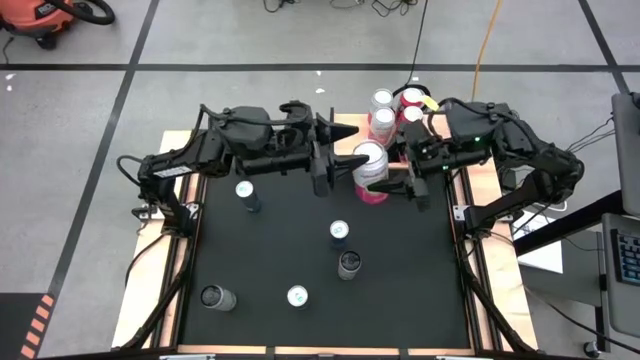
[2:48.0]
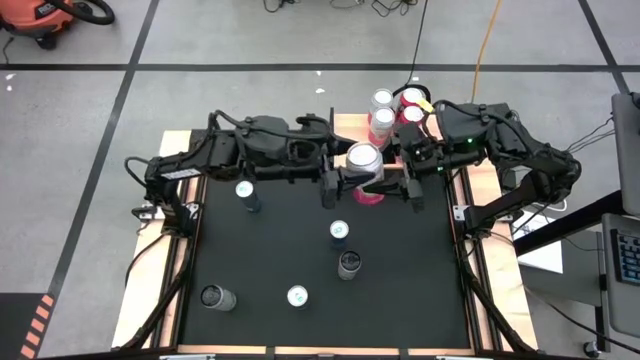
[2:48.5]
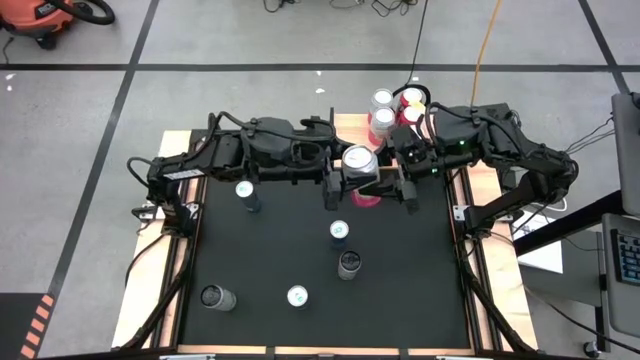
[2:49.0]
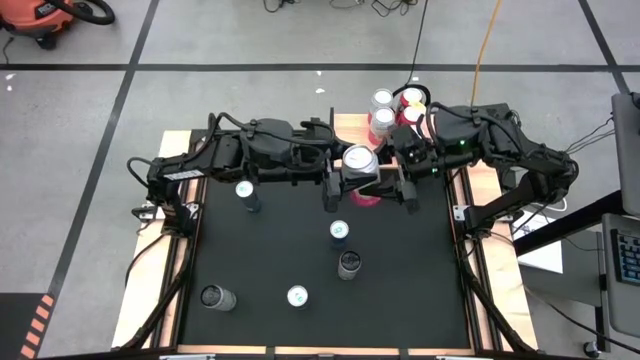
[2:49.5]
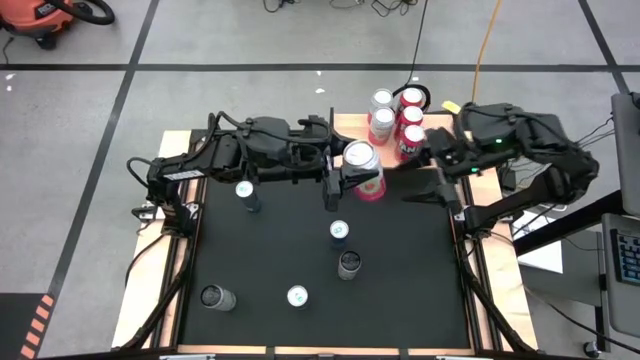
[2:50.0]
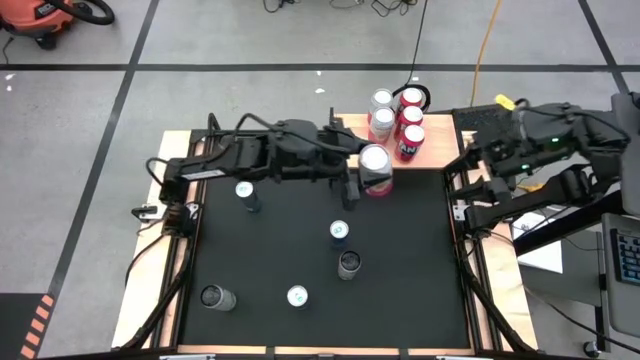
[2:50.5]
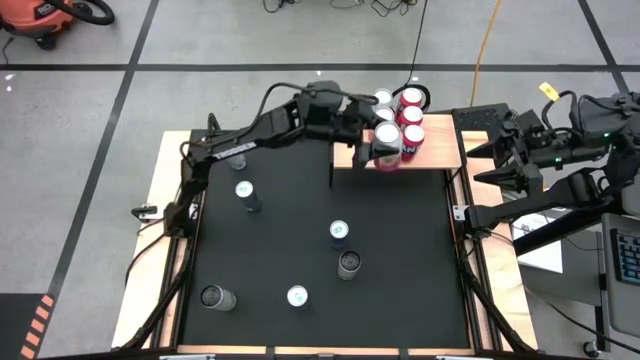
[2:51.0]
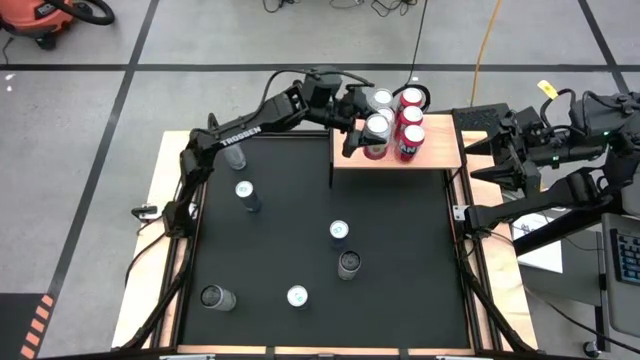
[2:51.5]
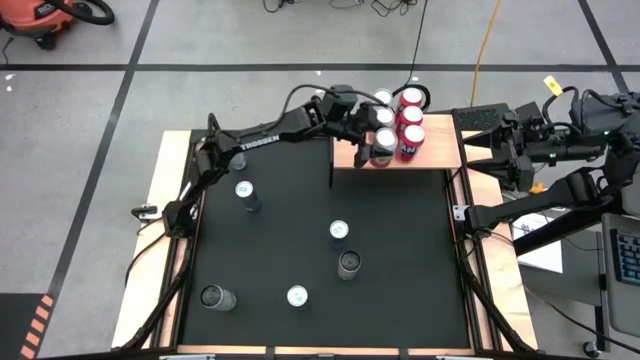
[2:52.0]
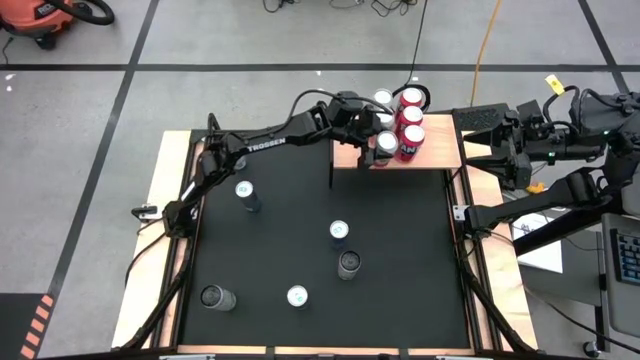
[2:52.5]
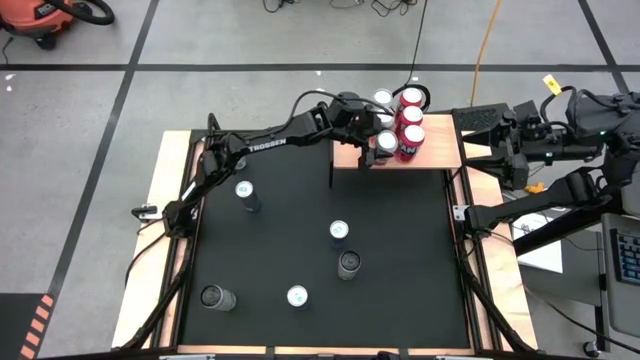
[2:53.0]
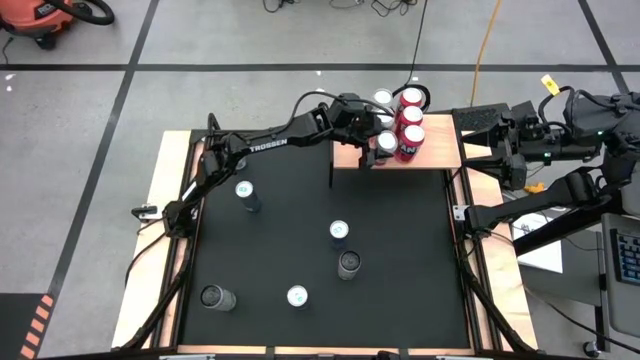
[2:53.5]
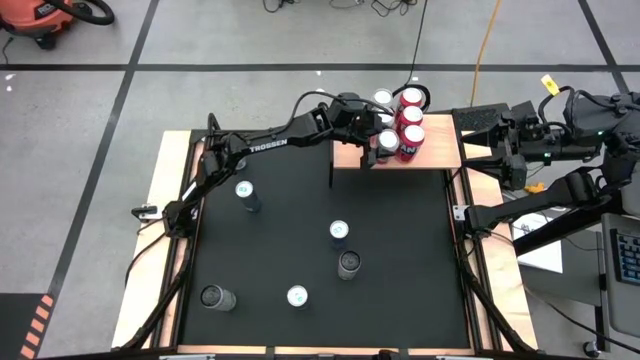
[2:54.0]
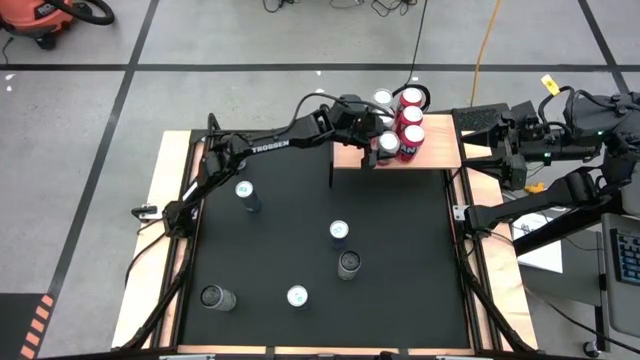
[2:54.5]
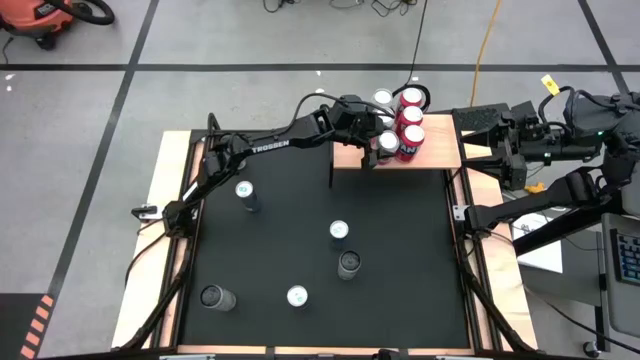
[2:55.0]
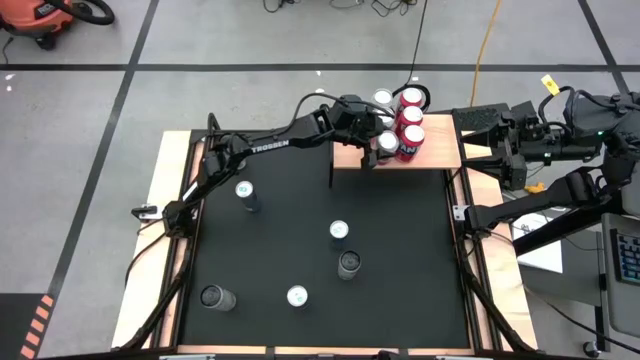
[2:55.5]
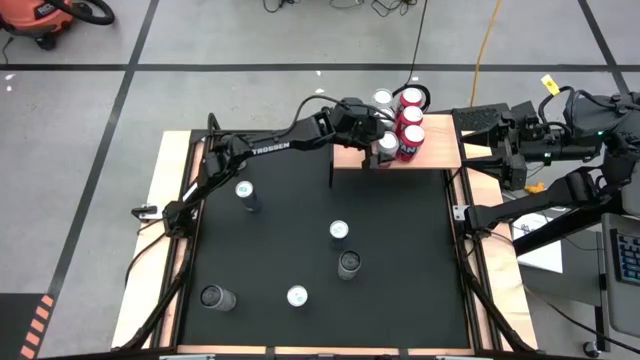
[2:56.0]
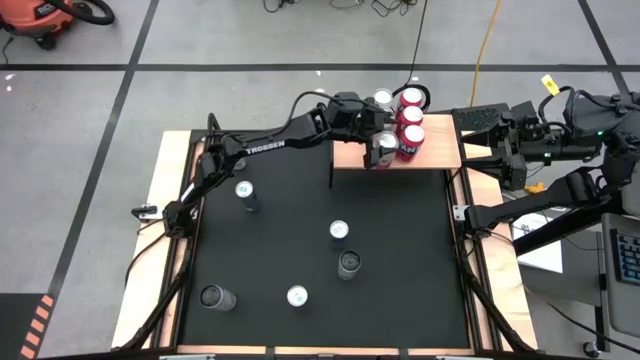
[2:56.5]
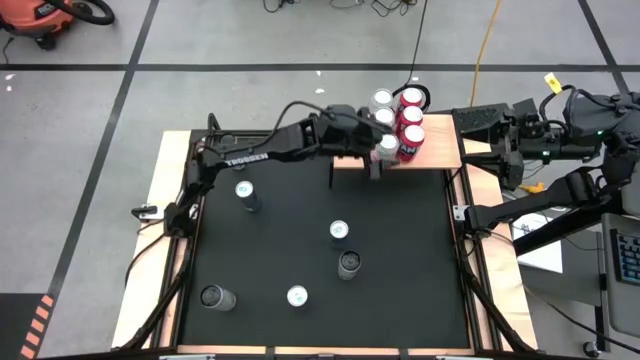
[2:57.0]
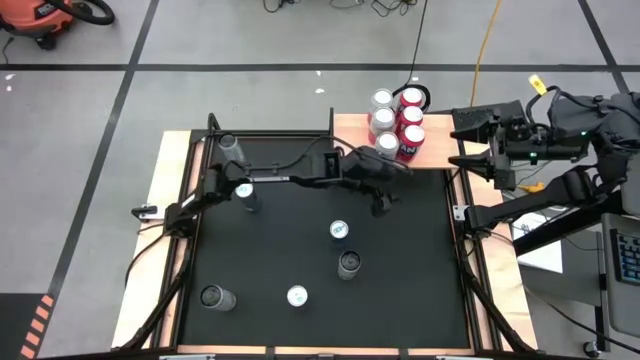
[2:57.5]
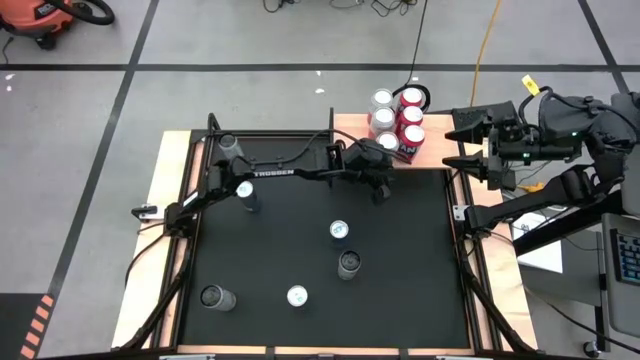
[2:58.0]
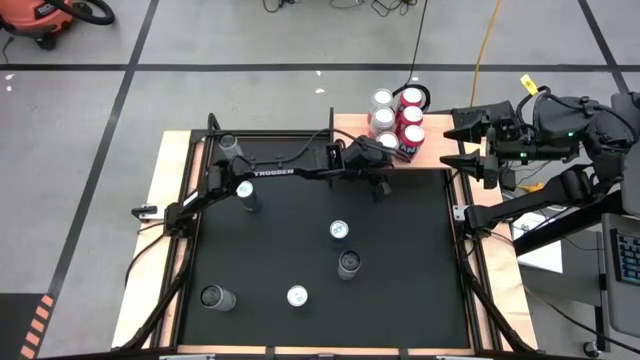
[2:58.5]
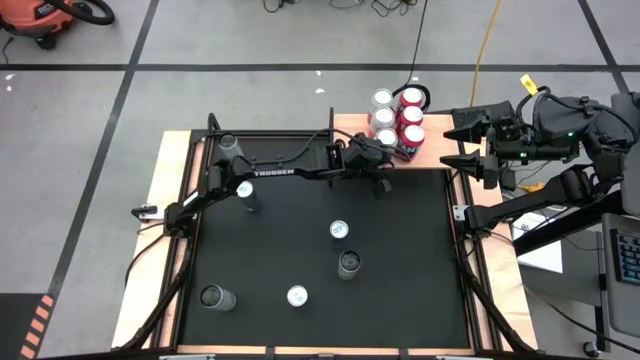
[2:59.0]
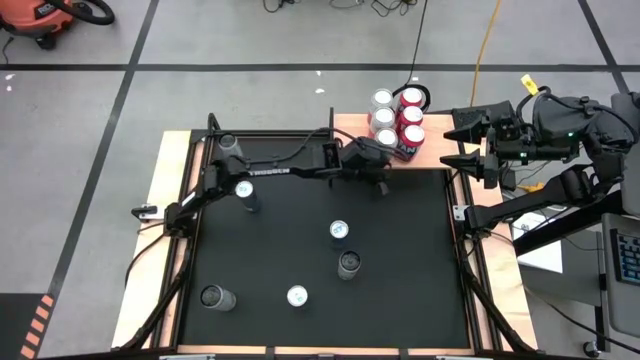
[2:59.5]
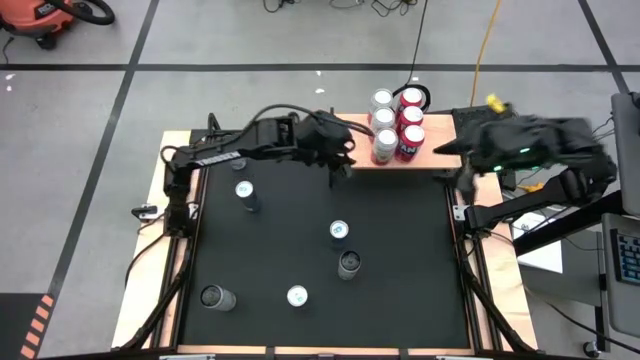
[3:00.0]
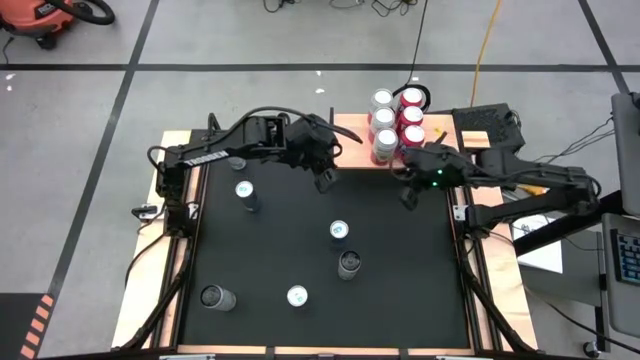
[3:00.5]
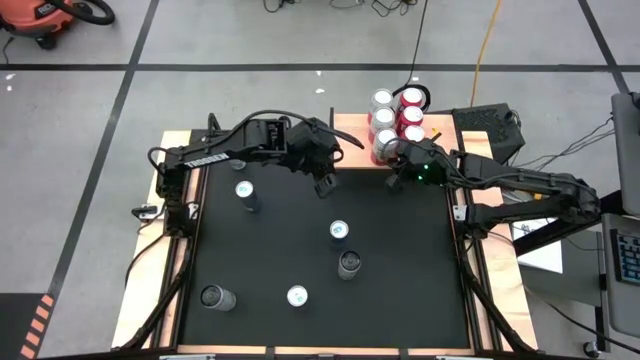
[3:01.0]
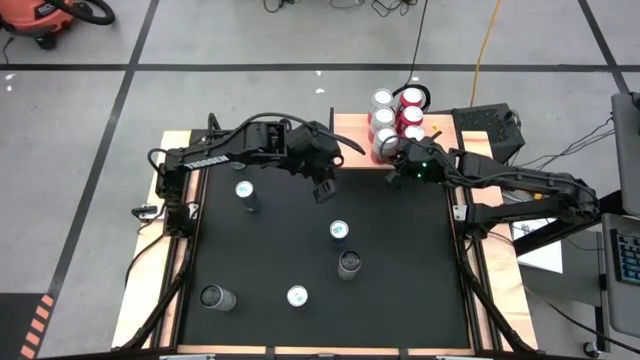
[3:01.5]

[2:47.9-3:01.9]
Task: Place canned beverage on shelf
Put the pink white soda can on the shelf aligned with the other pink white soda cans

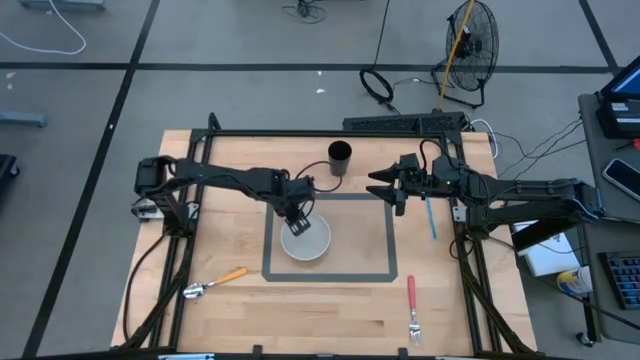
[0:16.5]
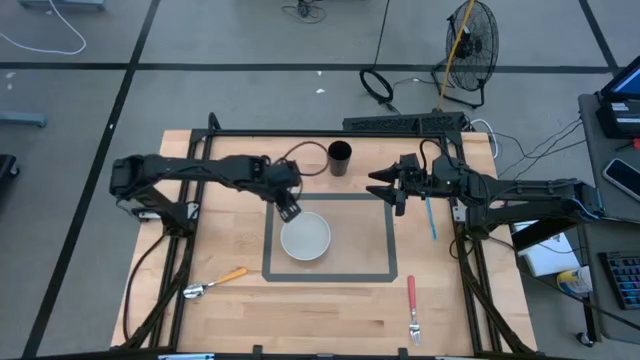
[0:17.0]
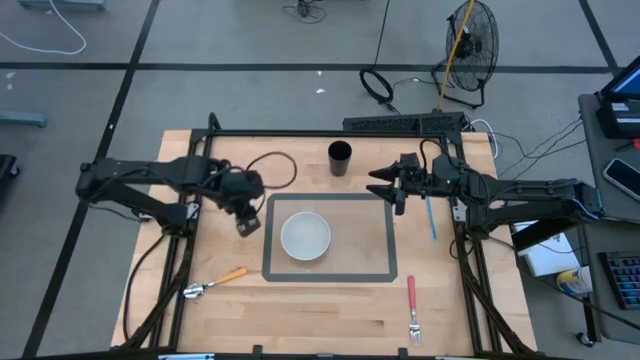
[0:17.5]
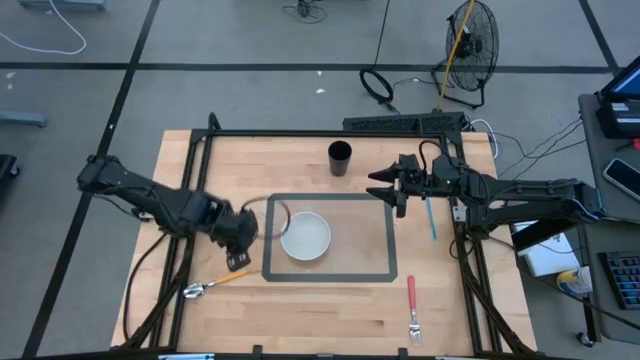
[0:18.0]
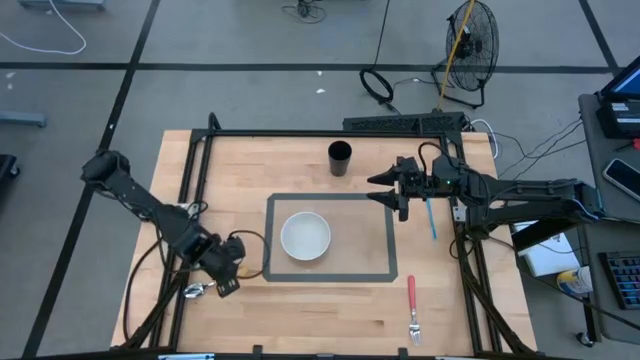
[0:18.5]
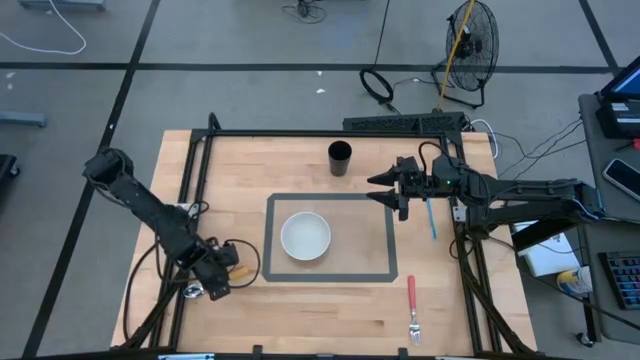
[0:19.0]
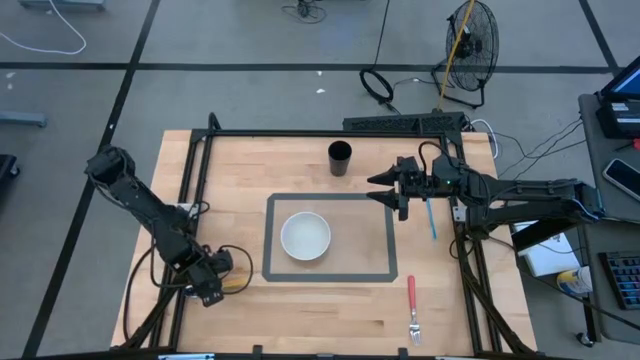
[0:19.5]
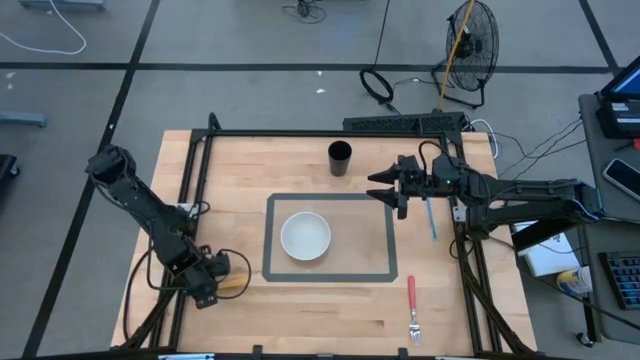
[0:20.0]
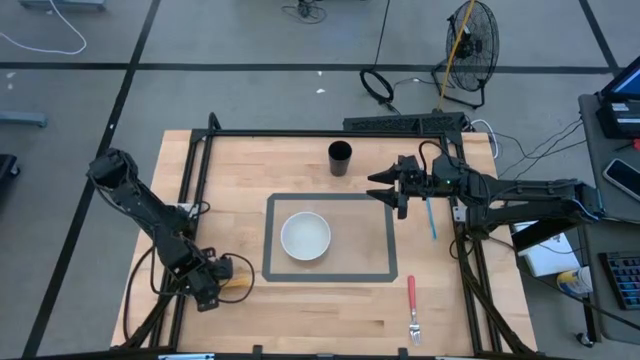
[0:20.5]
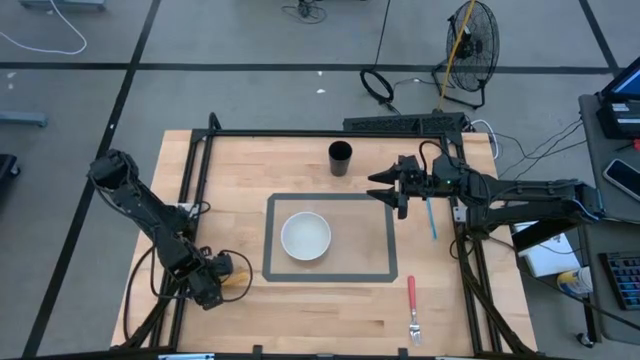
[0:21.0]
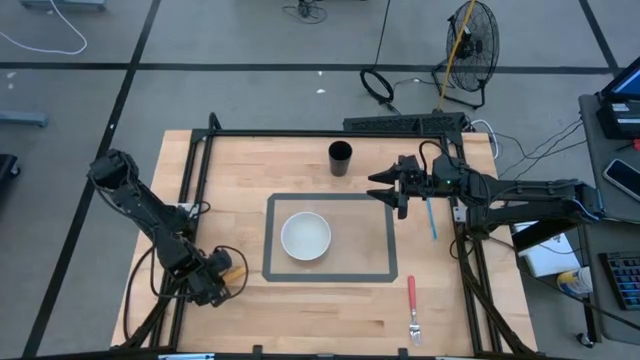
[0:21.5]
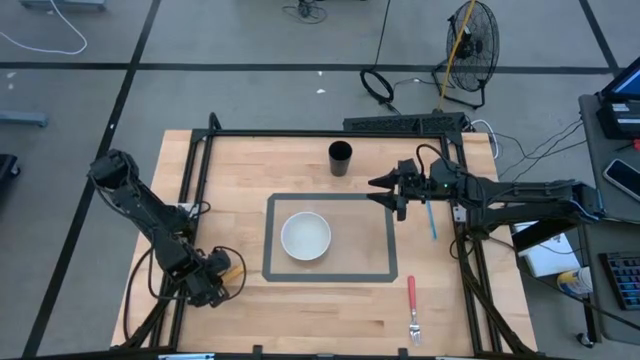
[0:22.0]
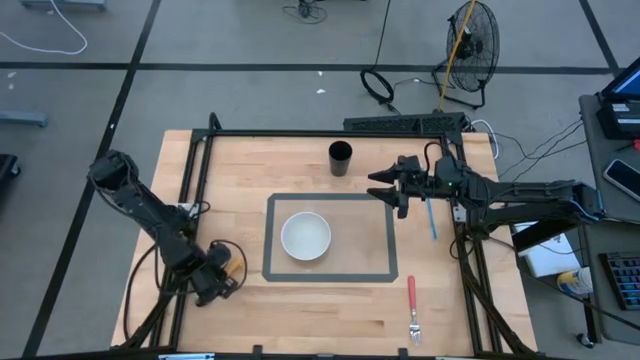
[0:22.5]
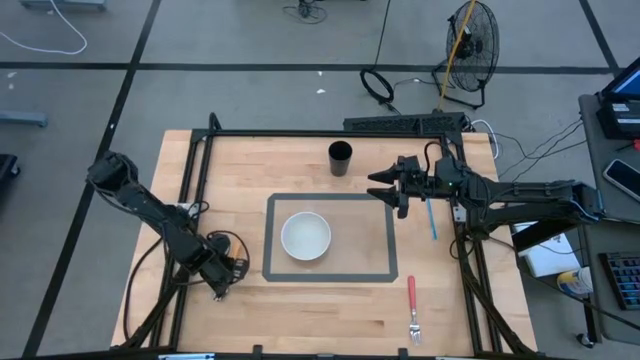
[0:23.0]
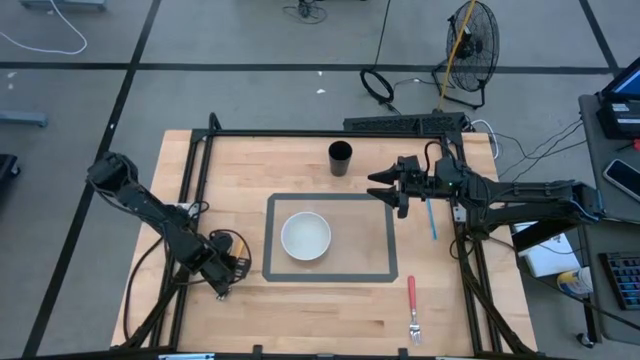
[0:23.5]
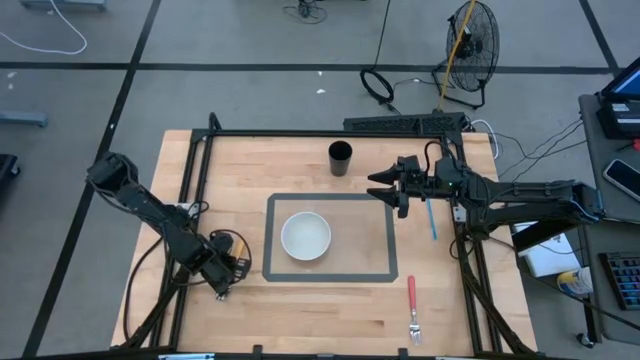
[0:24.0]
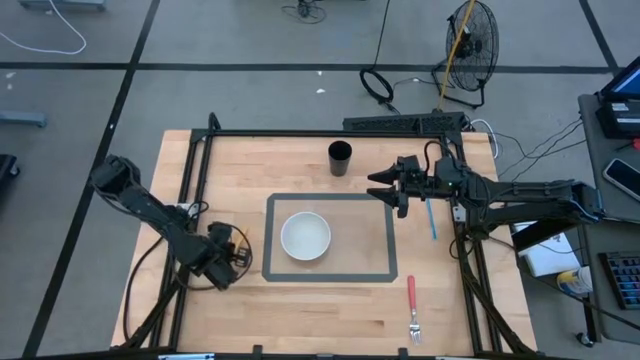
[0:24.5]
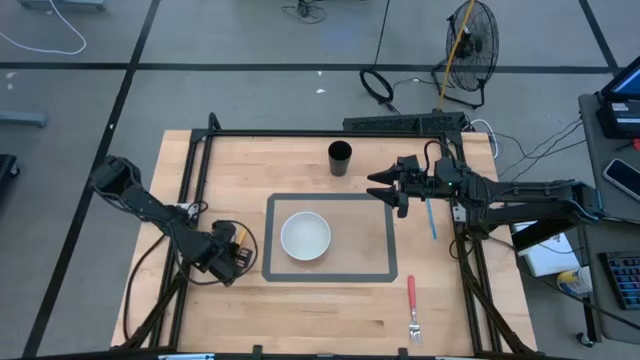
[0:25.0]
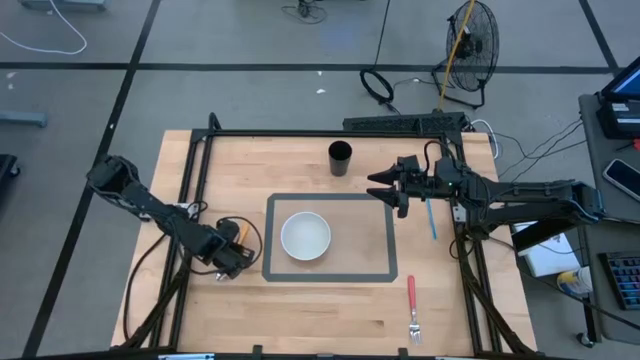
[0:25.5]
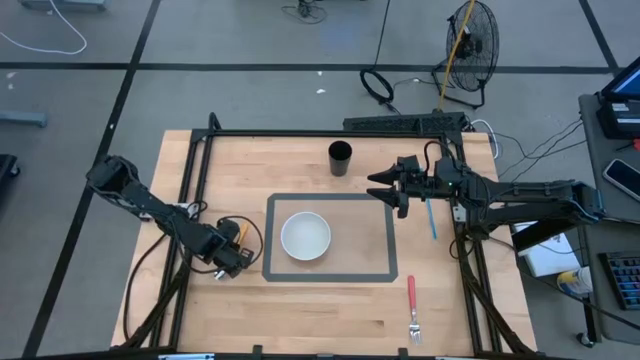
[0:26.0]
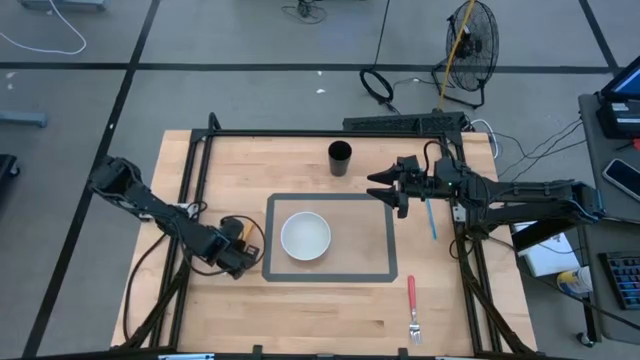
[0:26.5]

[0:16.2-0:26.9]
Task: Pick & Place Utensil
Put the yellow spoon into the white bowl on the light brown mat
